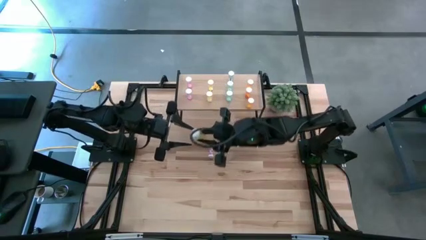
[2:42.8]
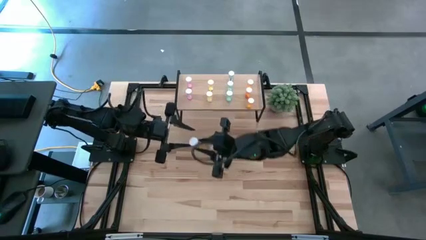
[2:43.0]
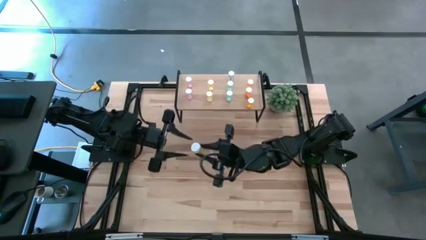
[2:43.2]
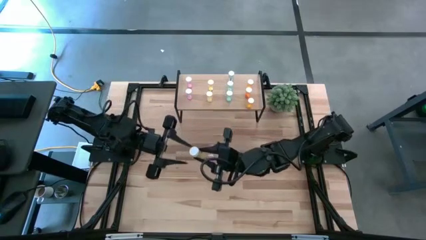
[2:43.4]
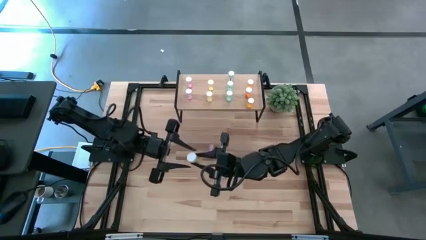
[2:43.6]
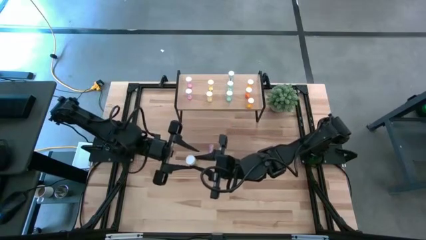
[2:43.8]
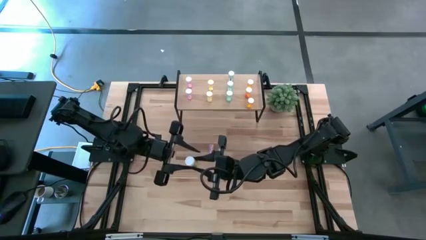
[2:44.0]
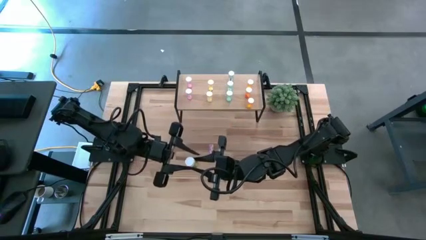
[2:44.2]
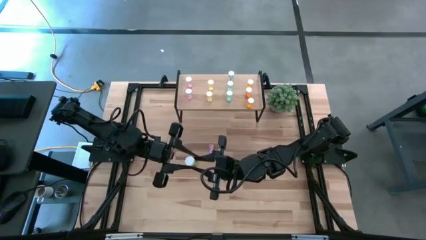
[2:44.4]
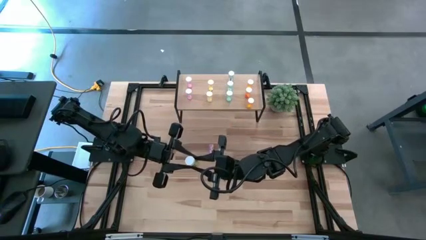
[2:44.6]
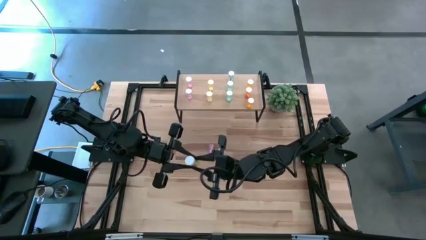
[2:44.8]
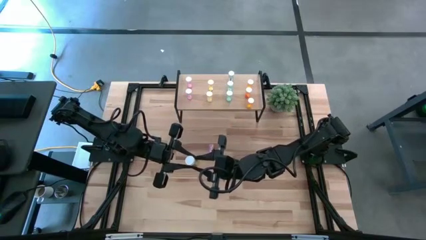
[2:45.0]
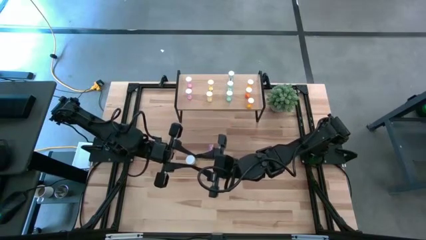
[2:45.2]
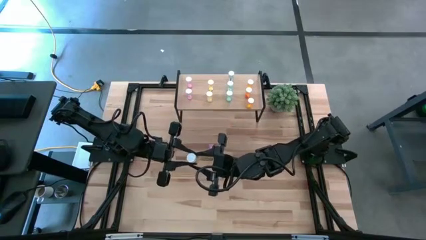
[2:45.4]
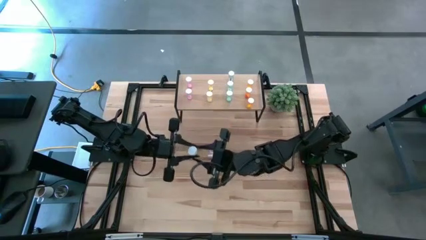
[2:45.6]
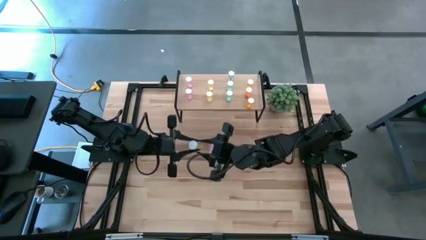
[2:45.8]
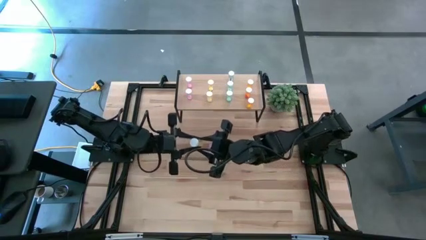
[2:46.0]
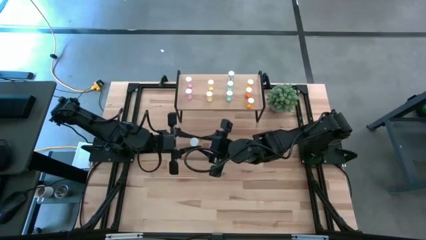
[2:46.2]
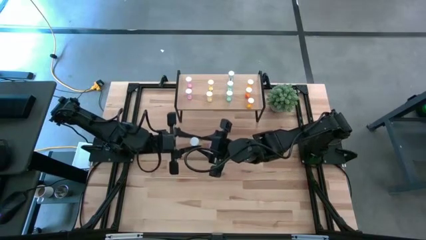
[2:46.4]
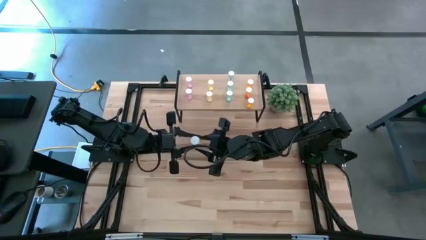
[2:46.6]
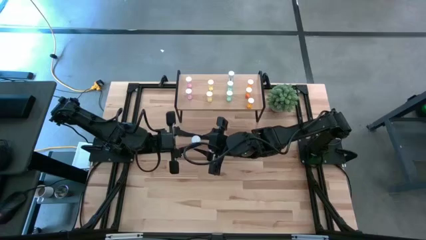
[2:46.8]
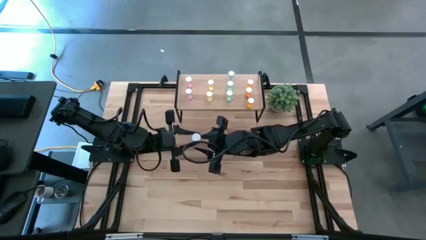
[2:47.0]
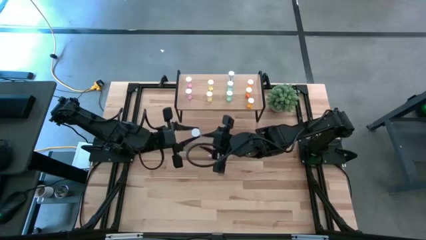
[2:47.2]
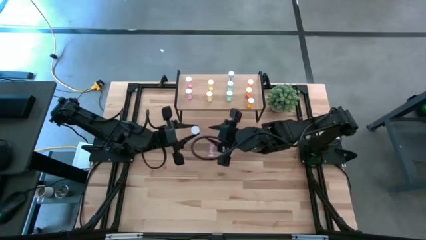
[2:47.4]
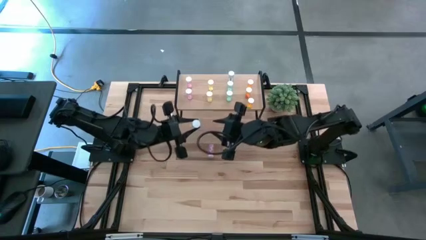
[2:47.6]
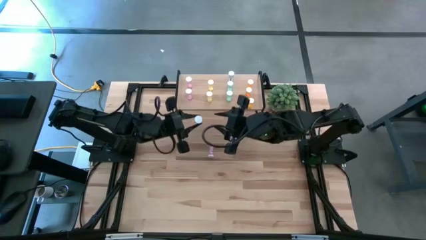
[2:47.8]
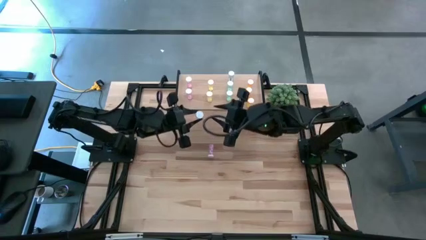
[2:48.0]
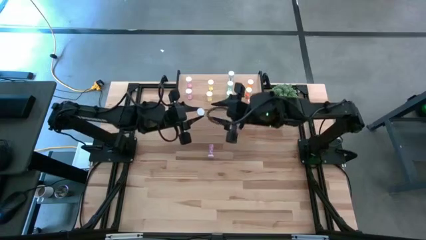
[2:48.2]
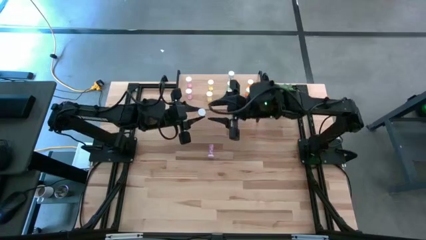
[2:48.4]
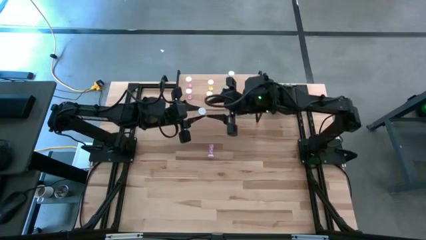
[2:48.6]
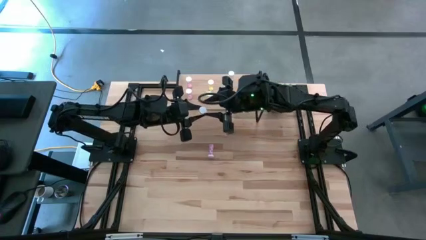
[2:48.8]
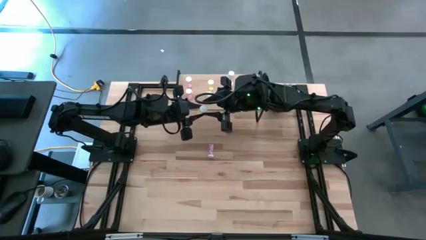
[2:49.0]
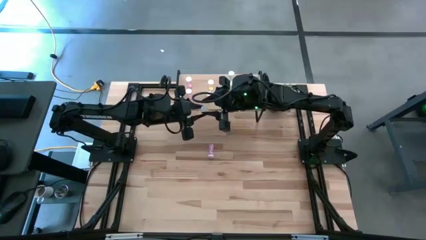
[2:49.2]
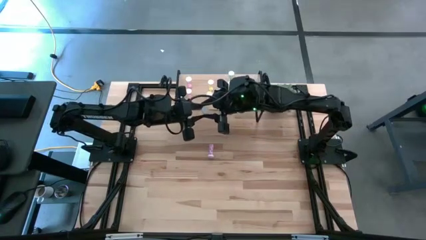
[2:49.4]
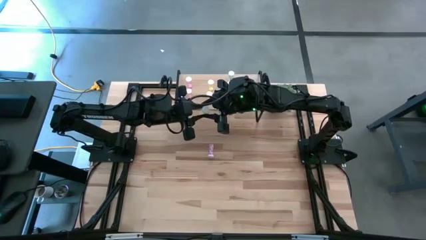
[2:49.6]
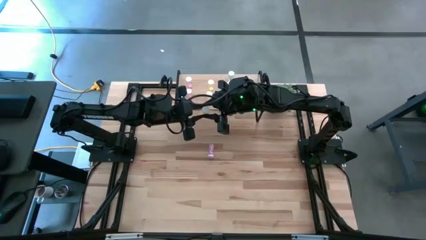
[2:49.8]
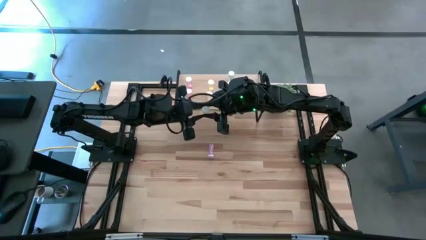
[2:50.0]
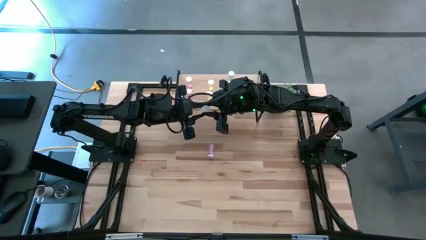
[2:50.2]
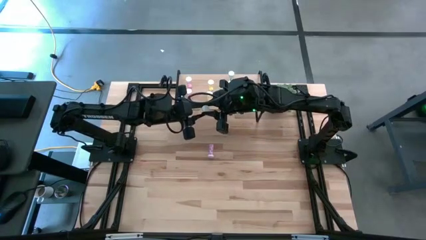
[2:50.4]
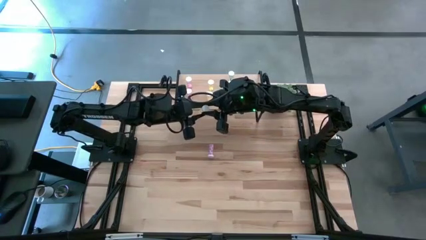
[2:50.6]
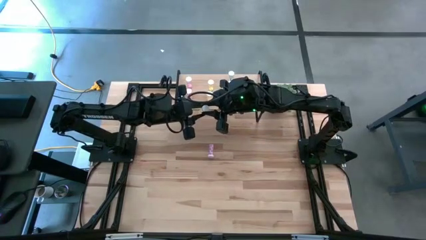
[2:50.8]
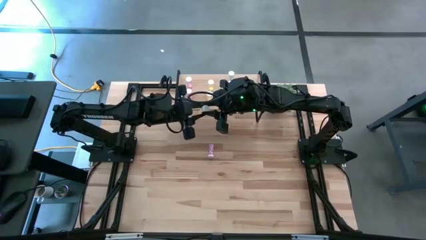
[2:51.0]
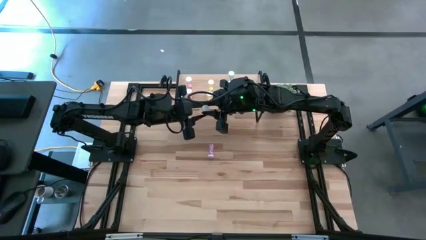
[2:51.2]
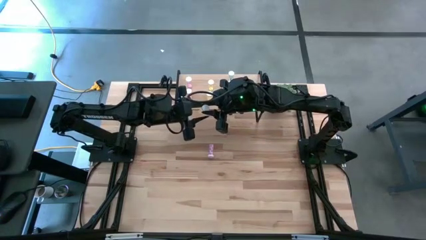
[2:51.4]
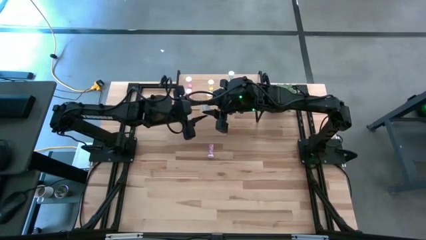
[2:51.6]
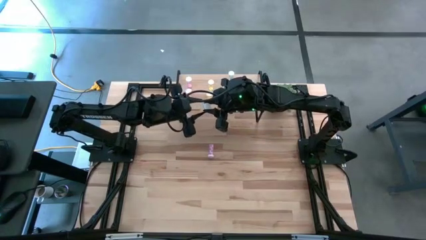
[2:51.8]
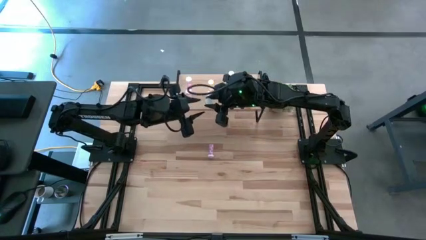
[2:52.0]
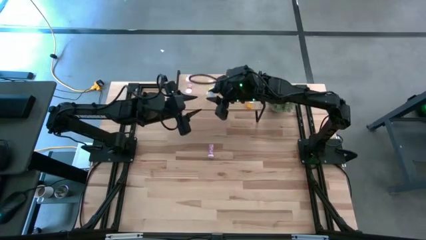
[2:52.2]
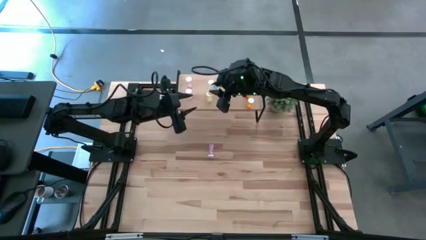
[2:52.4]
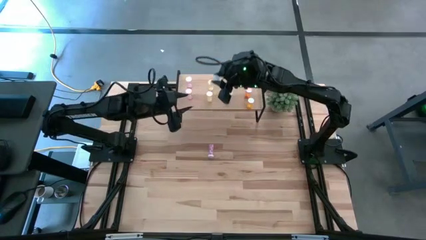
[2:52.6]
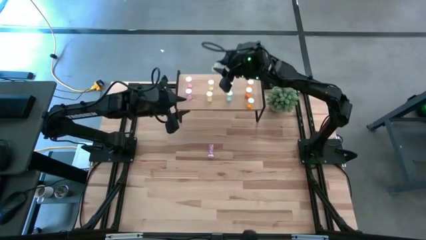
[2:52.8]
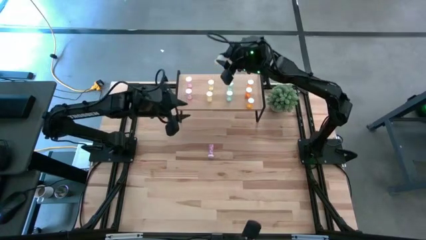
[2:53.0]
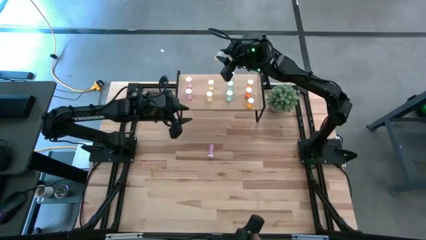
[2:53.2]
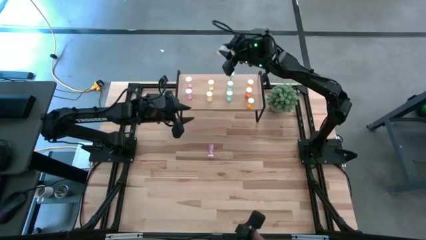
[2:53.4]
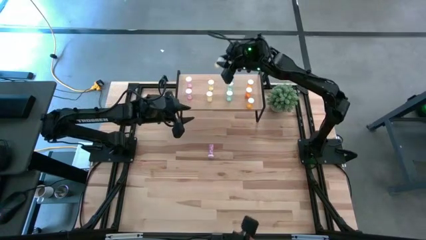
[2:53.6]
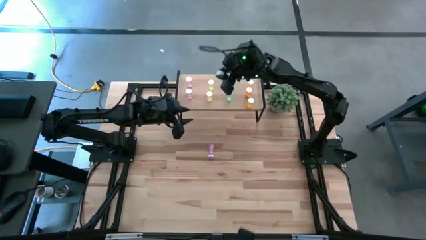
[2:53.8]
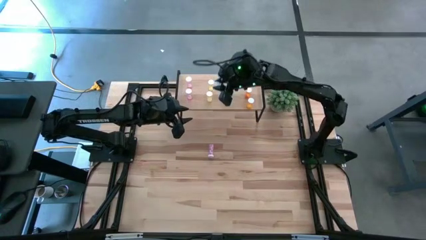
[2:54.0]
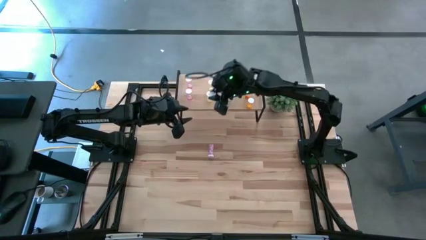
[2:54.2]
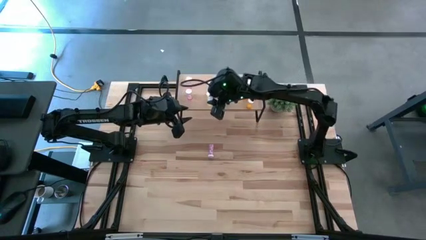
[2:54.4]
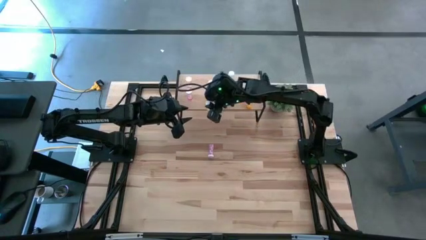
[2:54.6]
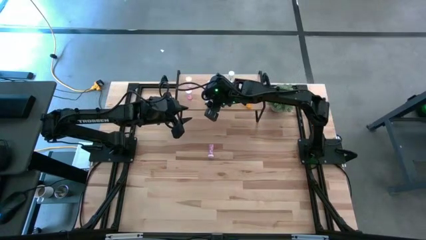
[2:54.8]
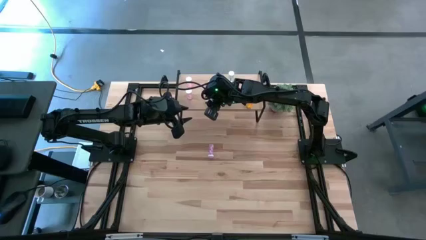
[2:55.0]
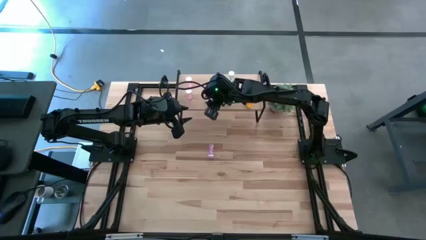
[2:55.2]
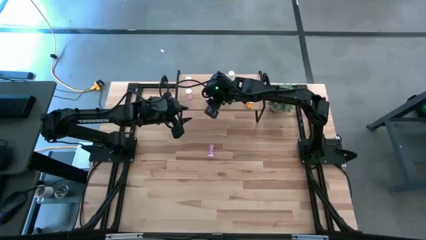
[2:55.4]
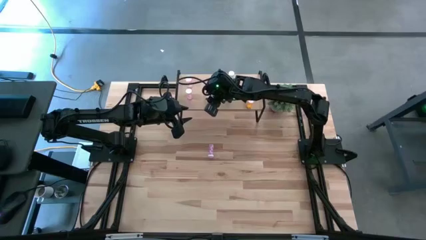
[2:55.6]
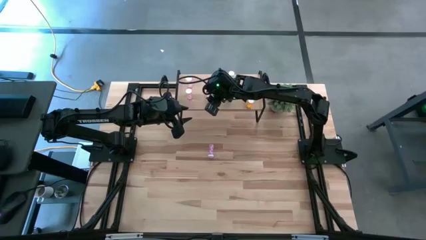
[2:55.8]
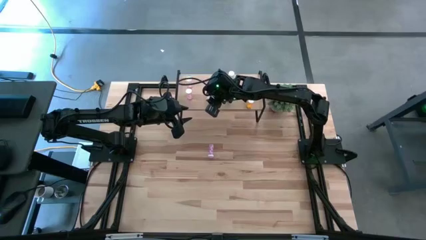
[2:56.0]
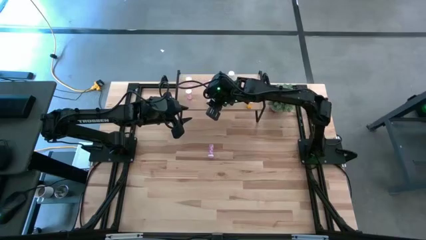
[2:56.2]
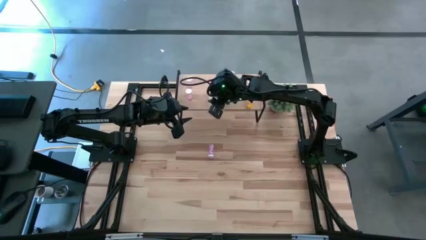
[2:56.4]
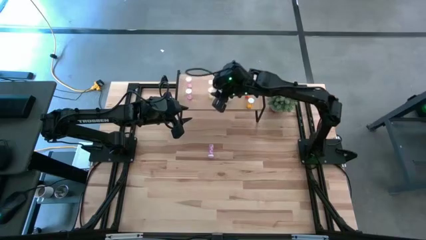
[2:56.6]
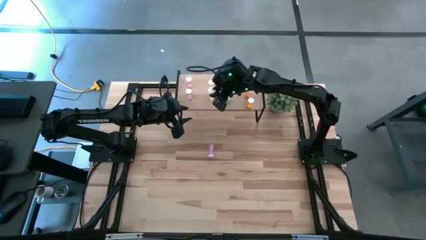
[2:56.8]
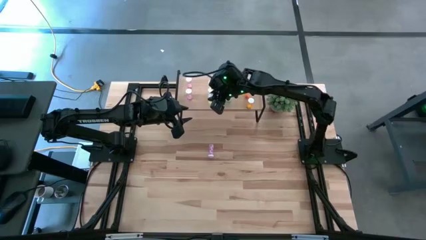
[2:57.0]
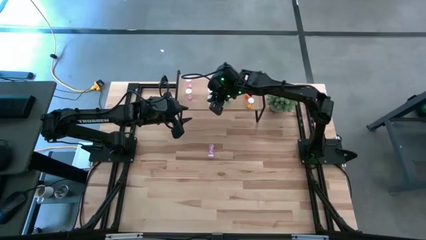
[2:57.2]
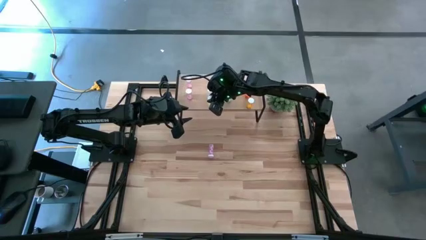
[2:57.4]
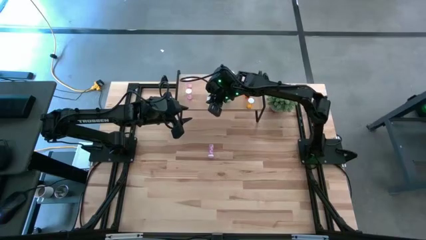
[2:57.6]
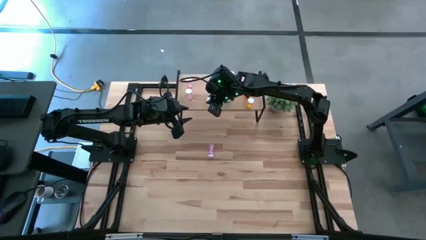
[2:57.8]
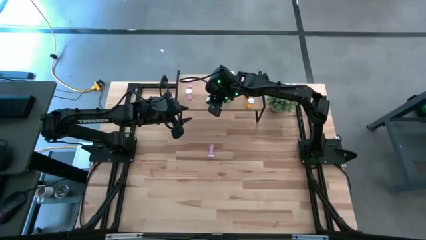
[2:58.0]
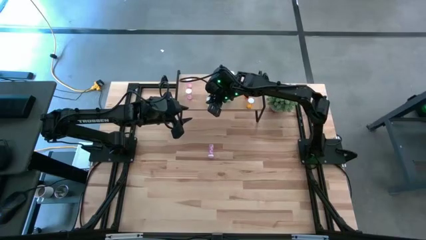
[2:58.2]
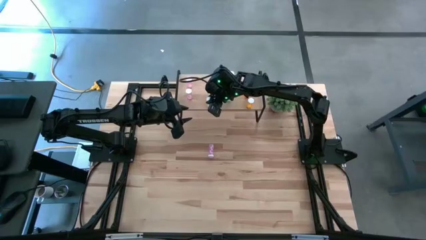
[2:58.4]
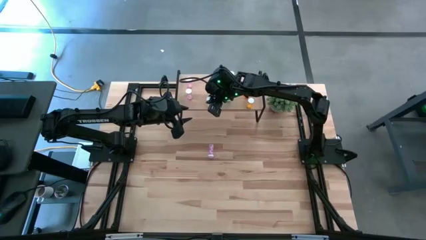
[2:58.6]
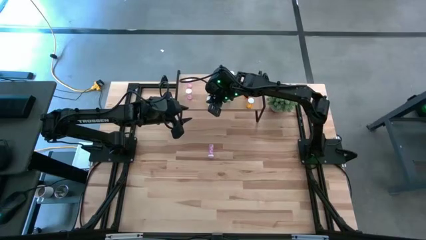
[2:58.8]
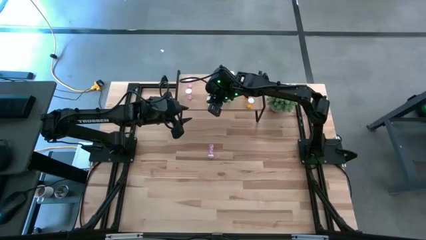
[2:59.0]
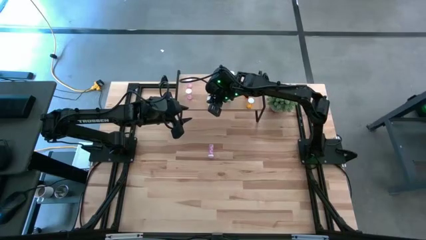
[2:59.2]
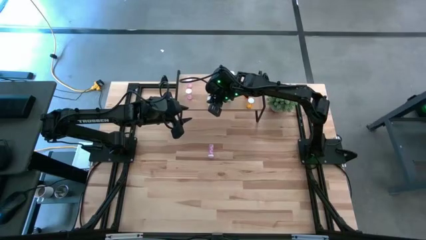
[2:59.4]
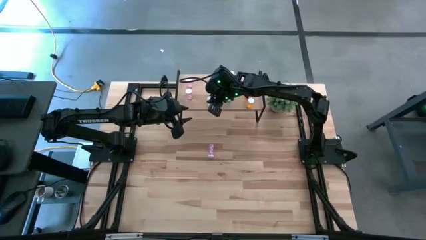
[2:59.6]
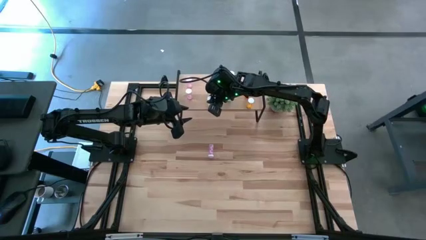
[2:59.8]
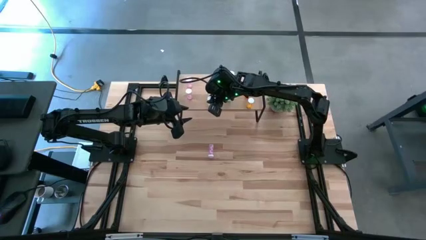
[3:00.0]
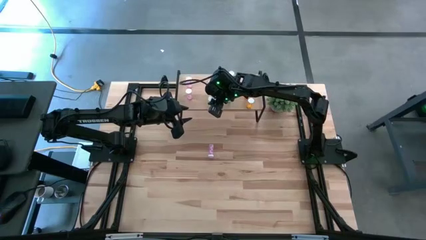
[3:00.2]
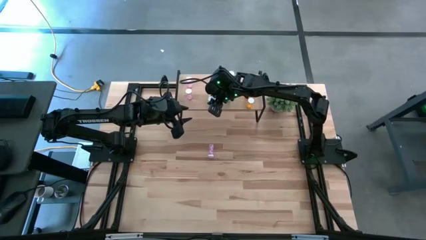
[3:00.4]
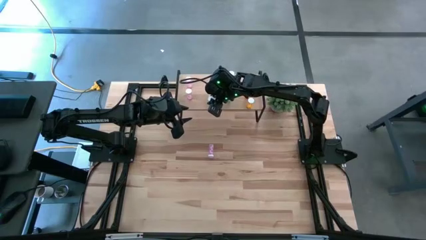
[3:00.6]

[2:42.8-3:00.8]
Task: Pick and place medicine bottles onto shelf by color
Put the yellow pill bottle aligned with the other yellow pill bottles on the shelf
